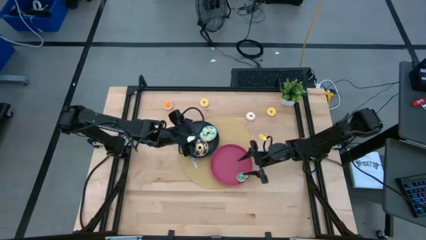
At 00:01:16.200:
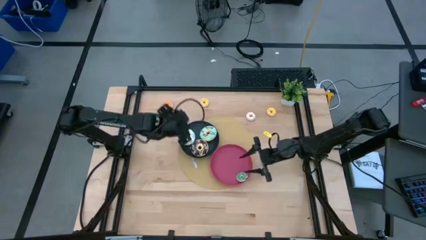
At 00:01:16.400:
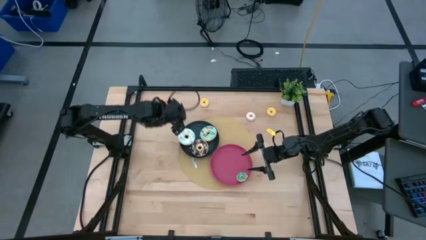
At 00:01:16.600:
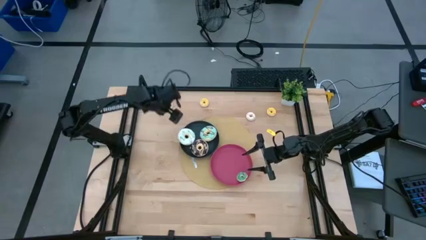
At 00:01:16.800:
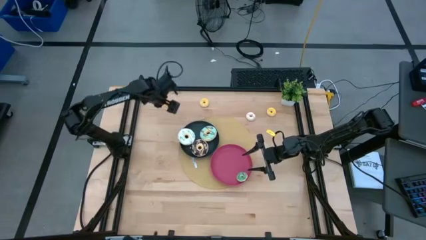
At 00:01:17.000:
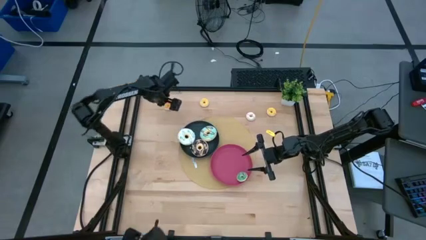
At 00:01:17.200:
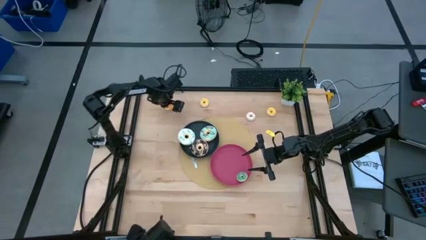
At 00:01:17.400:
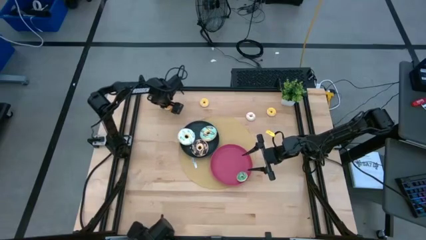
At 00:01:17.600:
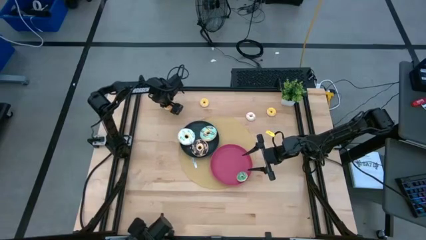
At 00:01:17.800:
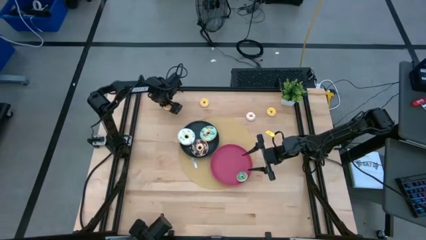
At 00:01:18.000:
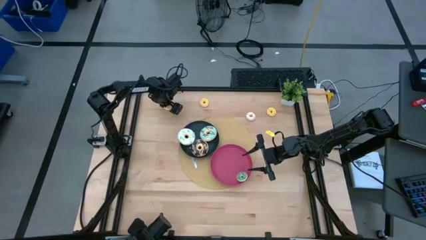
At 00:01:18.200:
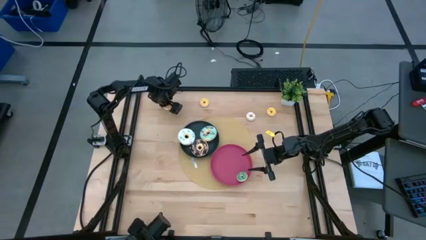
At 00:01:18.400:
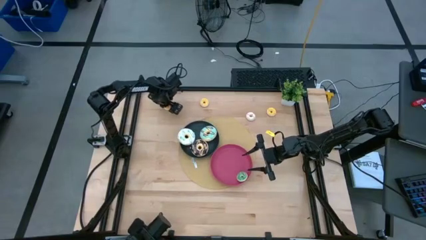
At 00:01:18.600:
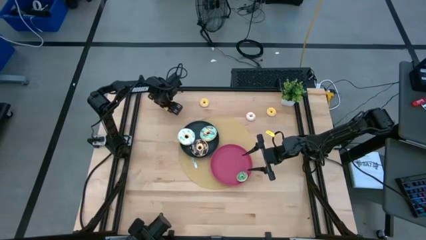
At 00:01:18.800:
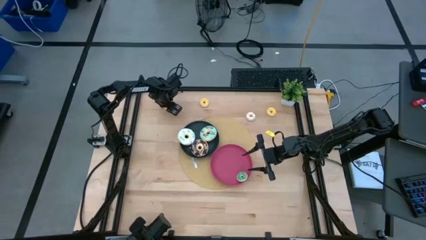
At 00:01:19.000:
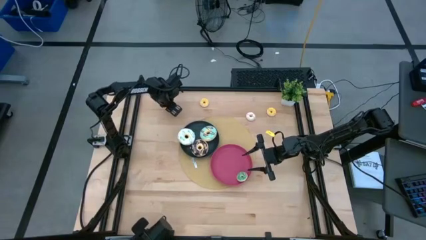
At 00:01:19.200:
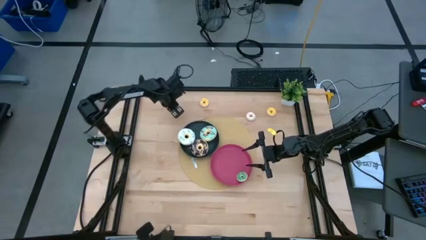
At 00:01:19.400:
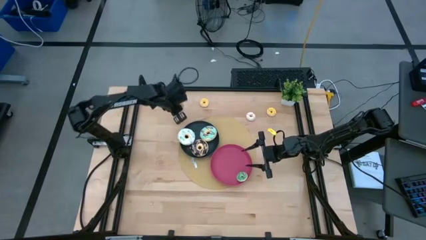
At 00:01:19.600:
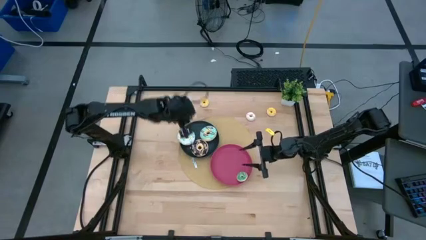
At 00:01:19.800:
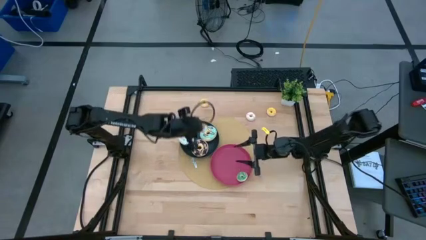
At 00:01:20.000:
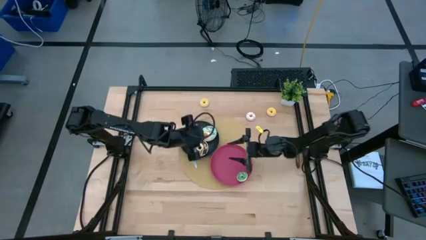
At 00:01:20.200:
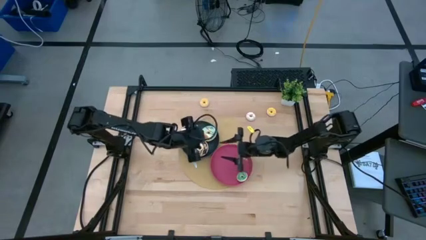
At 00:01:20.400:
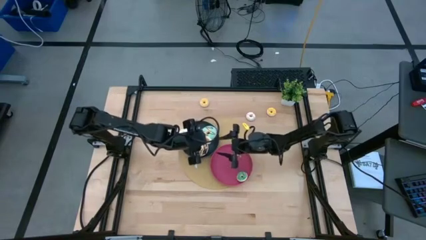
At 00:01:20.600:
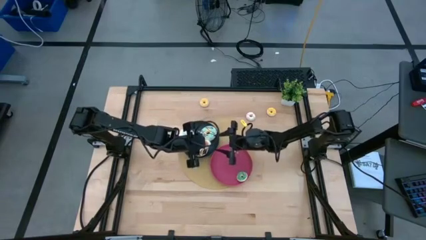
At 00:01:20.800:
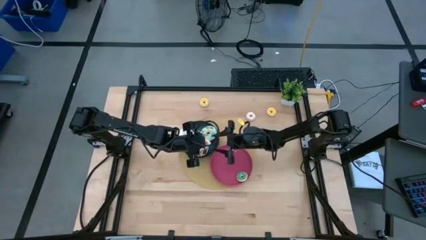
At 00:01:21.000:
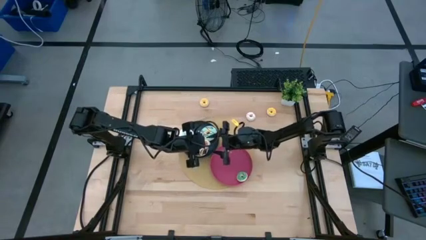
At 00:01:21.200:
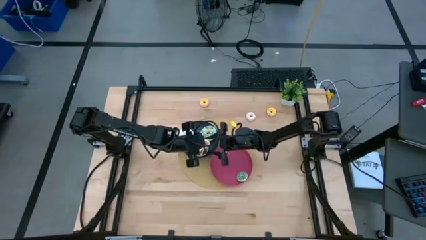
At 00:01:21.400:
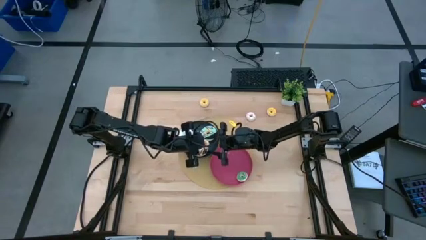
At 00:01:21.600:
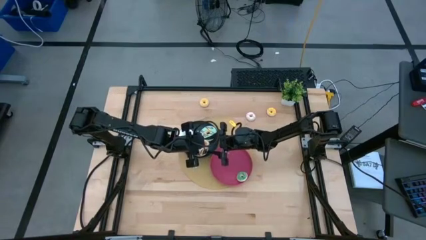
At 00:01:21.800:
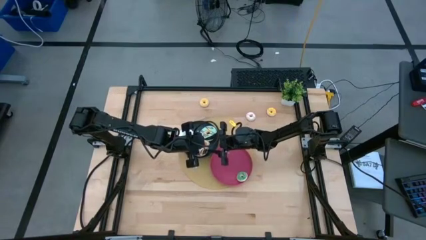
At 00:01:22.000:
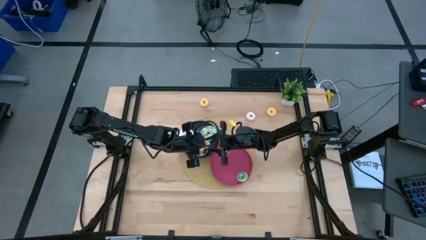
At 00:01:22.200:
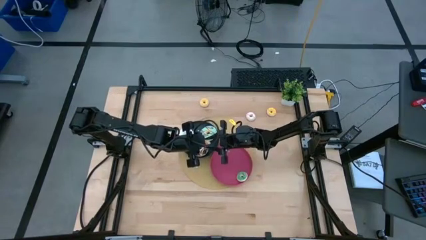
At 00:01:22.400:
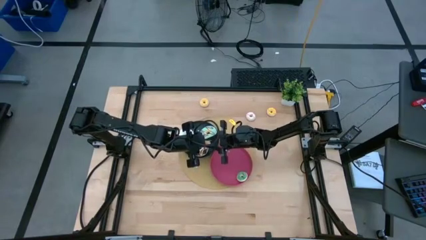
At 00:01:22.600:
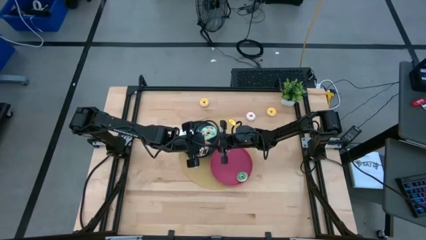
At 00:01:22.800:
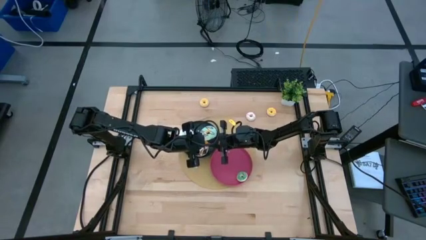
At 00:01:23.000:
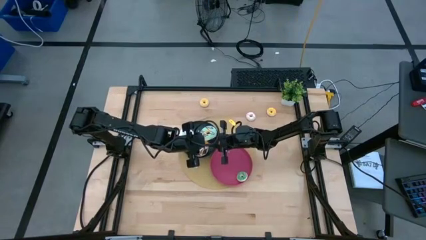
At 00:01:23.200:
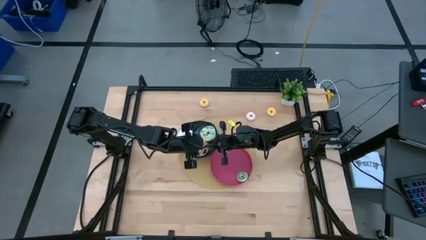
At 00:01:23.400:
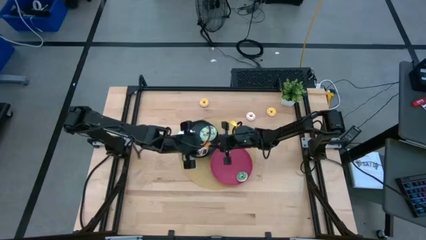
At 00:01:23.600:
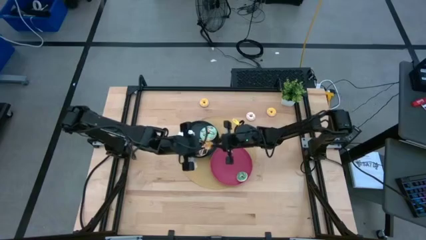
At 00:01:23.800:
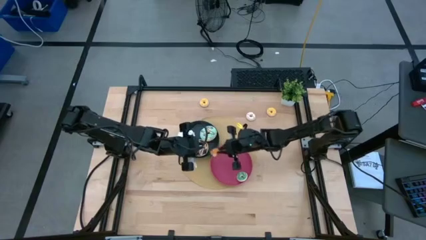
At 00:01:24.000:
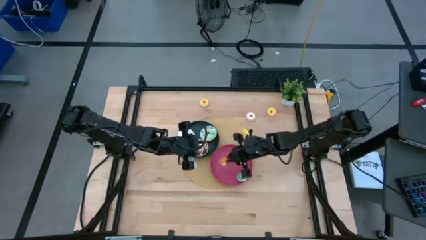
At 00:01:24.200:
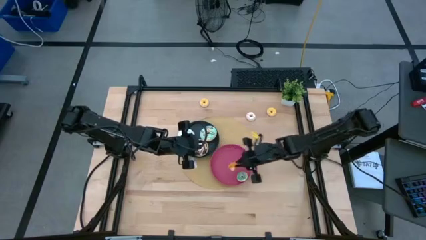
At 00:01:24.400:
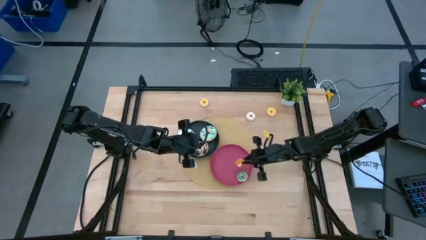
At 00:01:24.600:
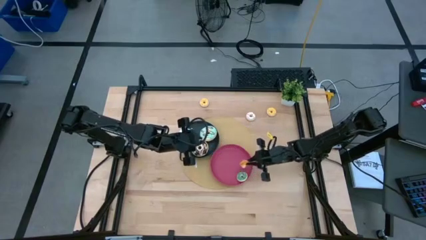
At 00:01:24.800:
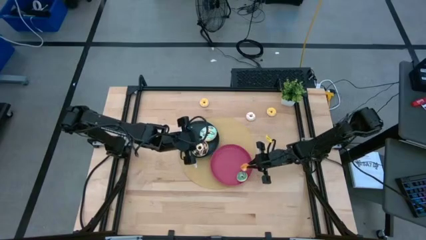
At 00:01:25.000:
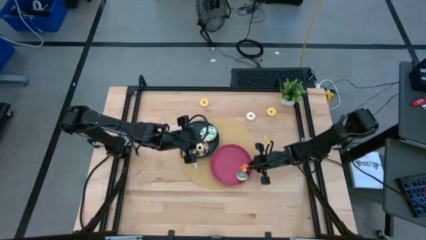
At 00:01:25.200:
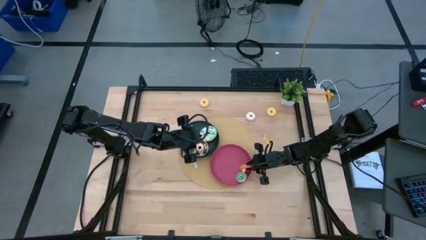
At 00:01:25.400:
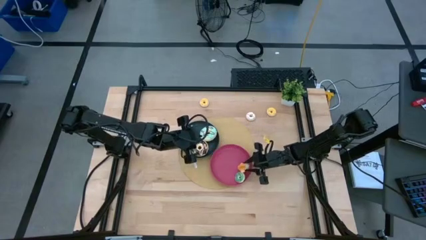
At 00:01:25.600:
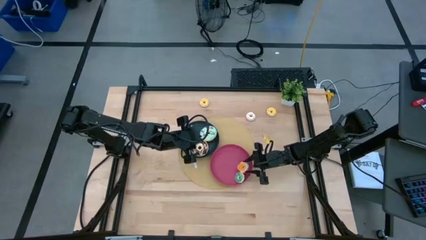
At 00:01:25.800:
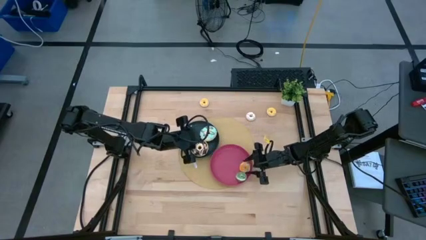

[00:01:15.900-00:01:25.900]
Task: Pick & Place donuts
Put the small orange donut on the pink plate
